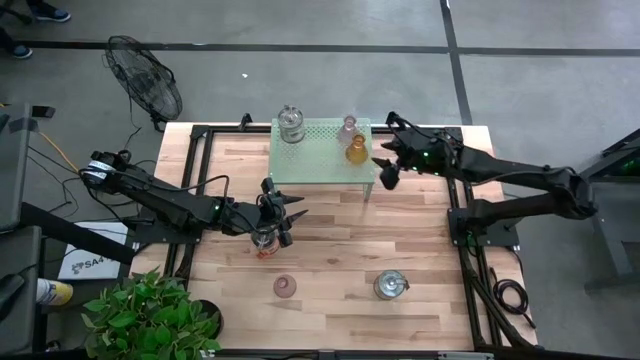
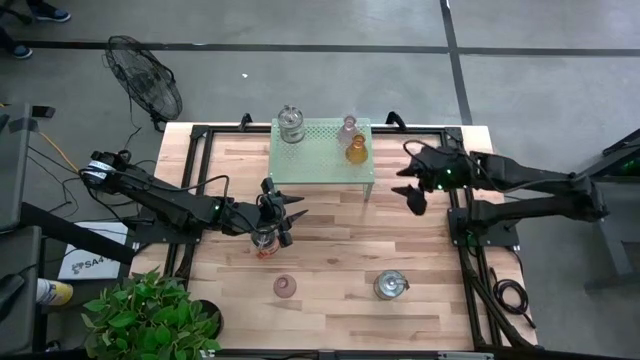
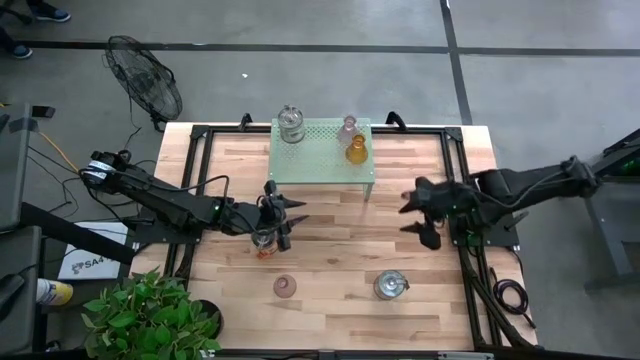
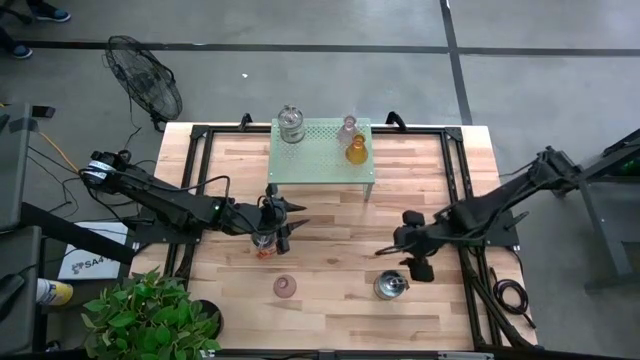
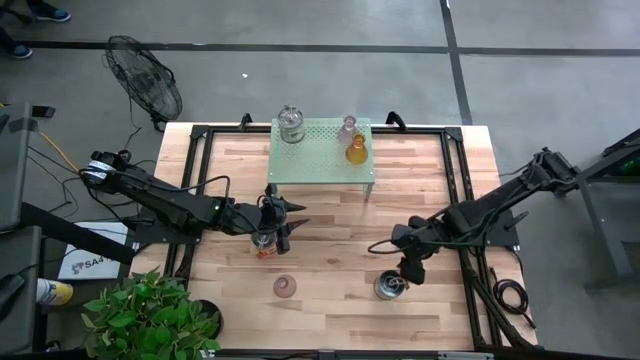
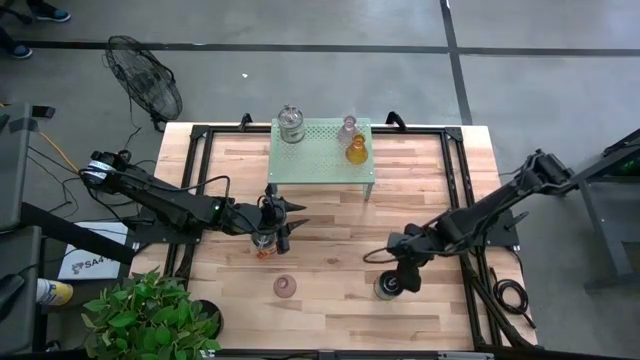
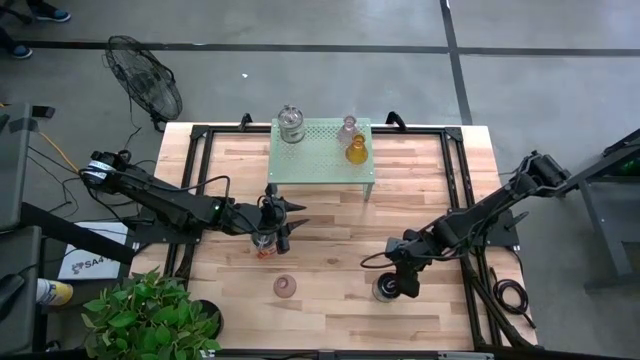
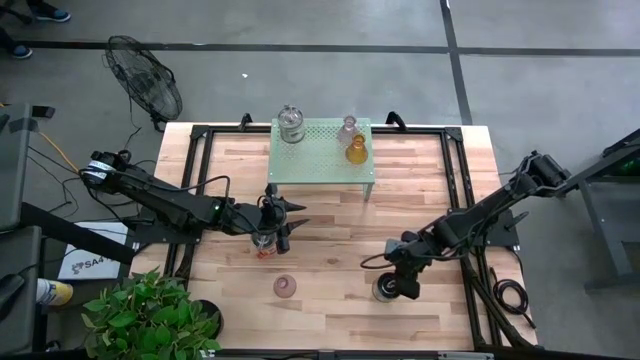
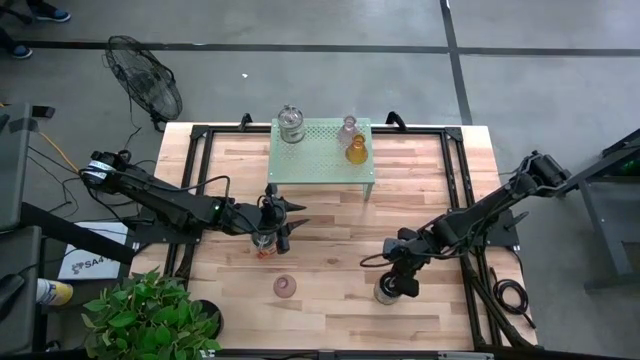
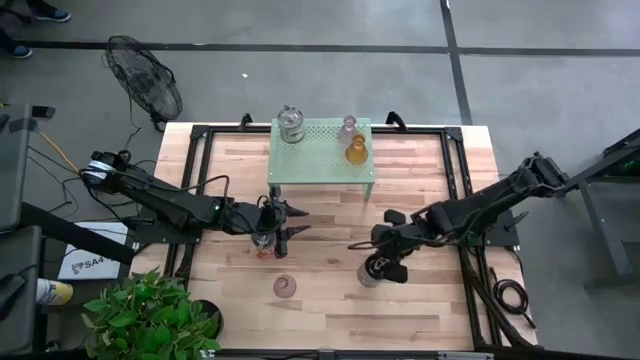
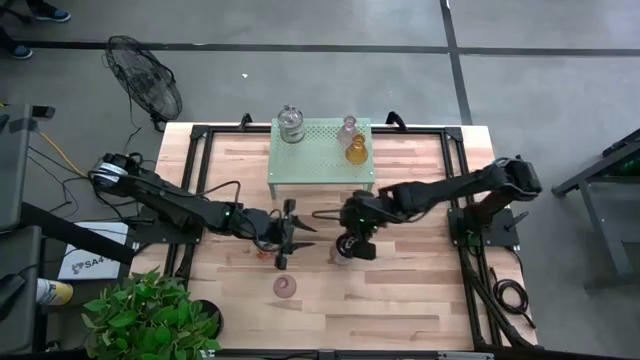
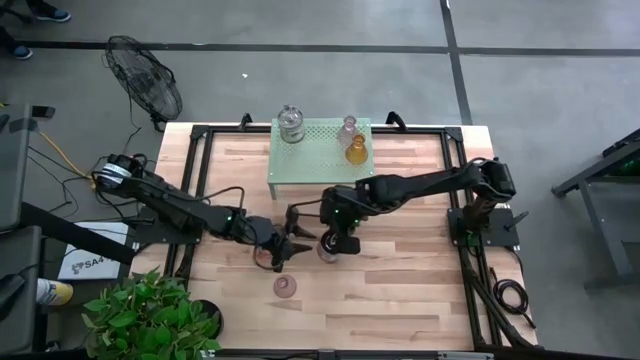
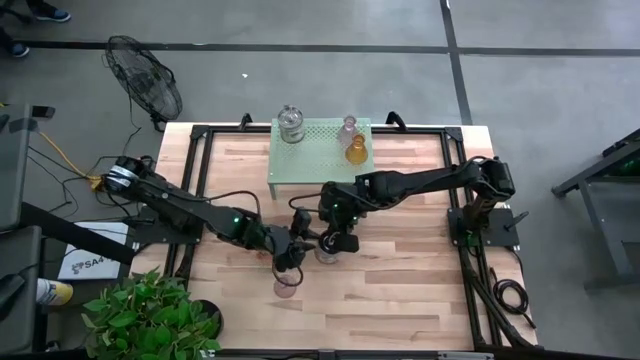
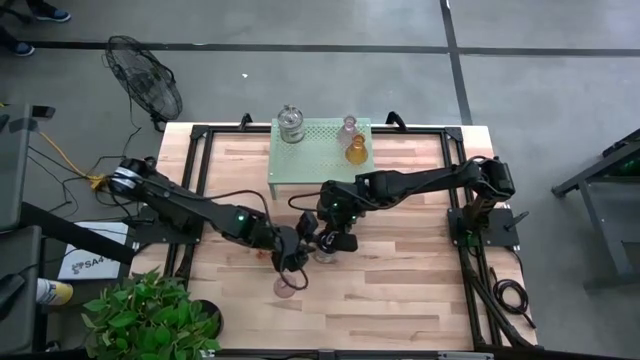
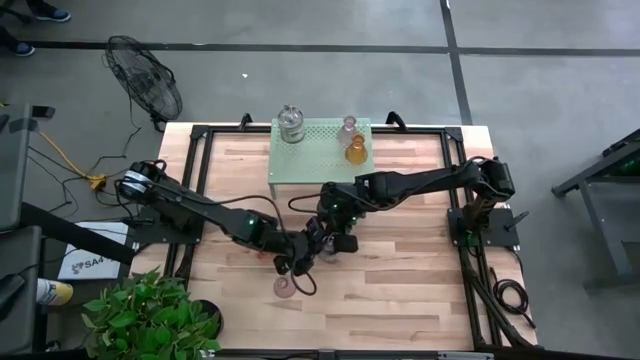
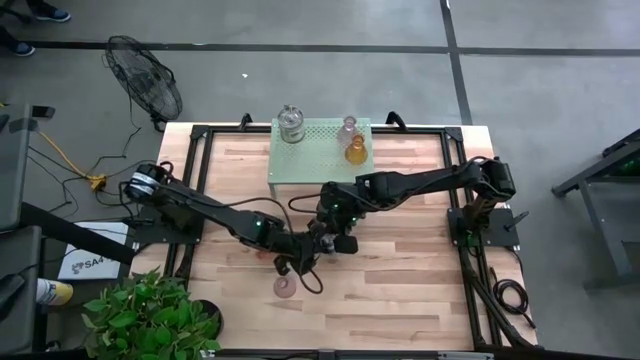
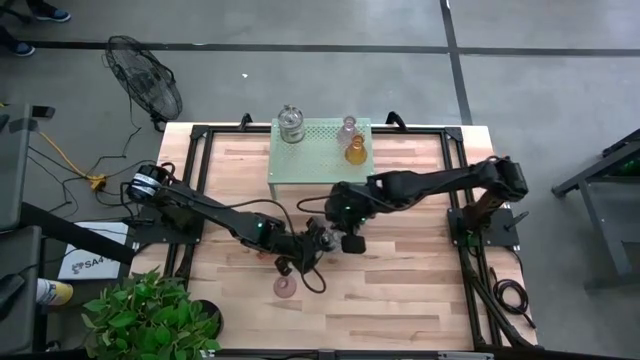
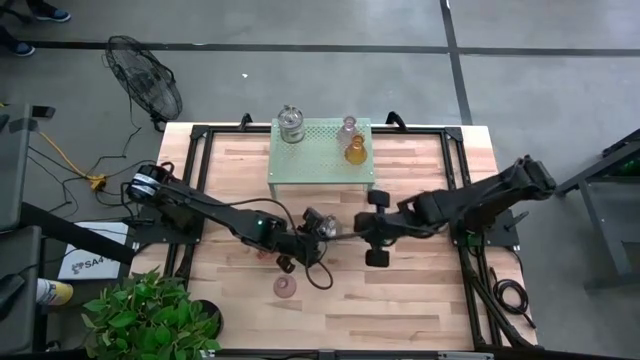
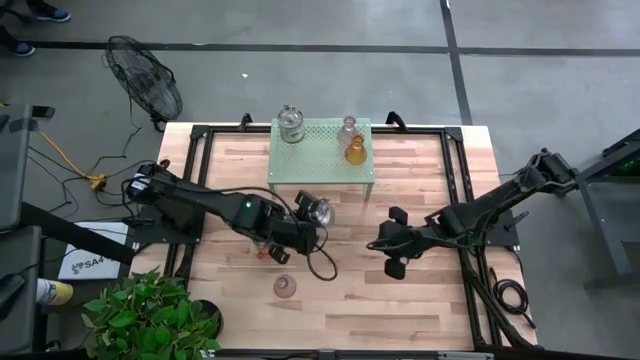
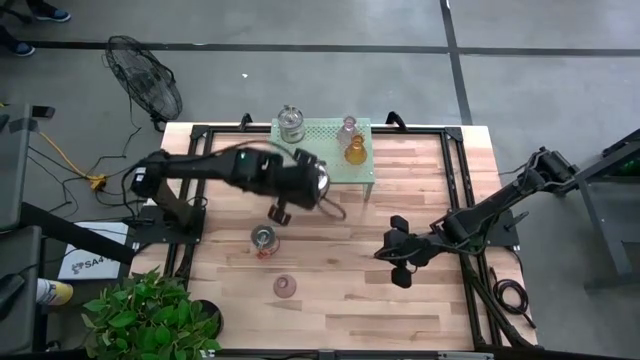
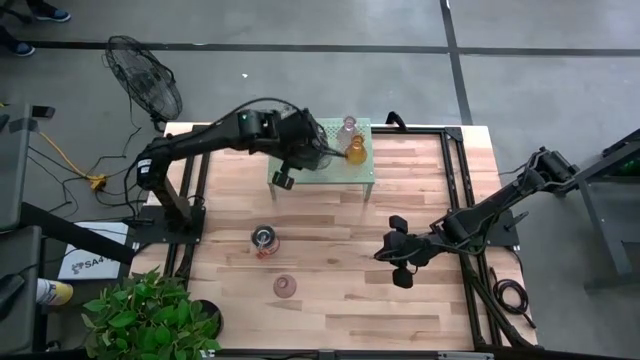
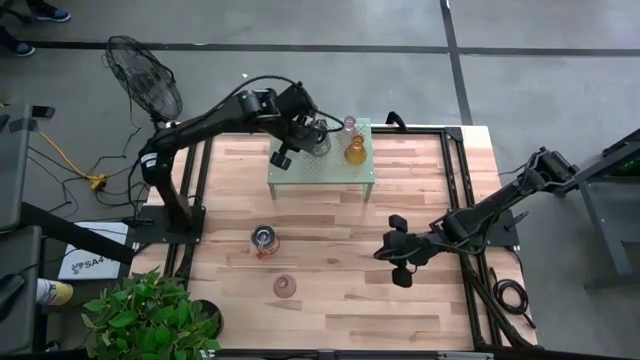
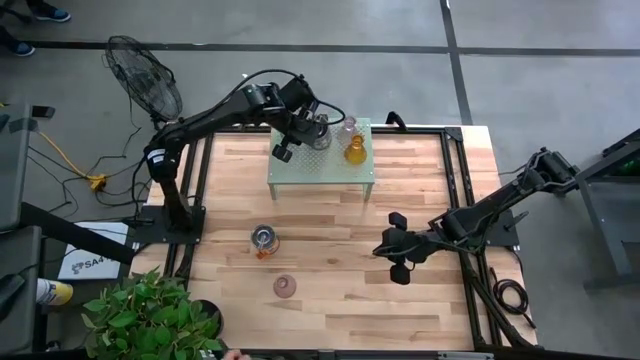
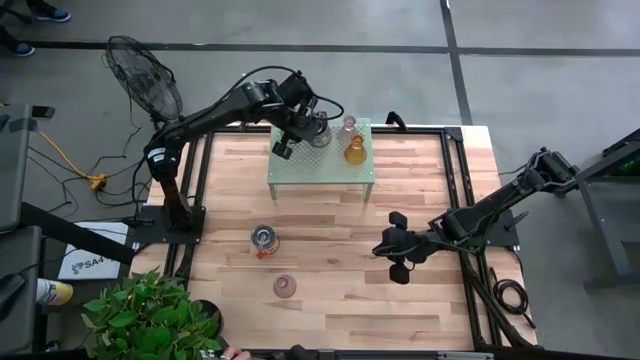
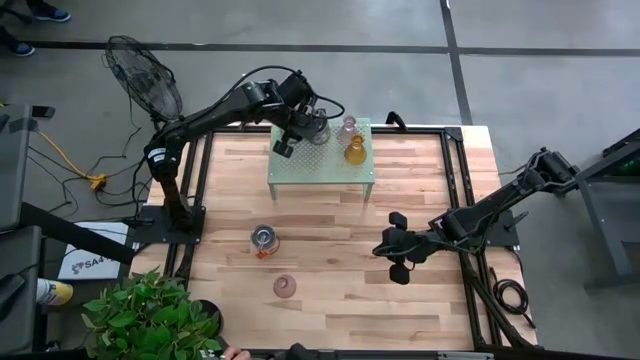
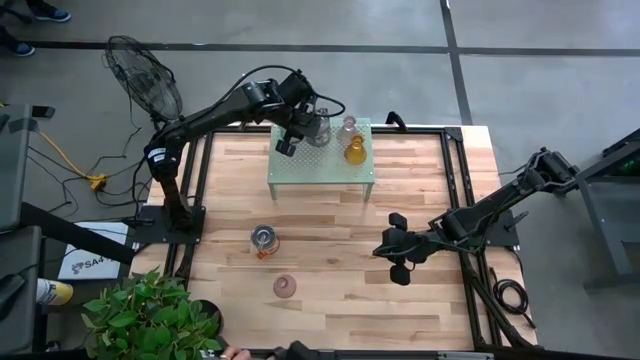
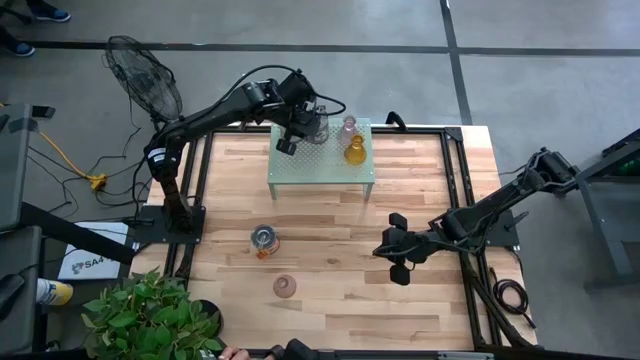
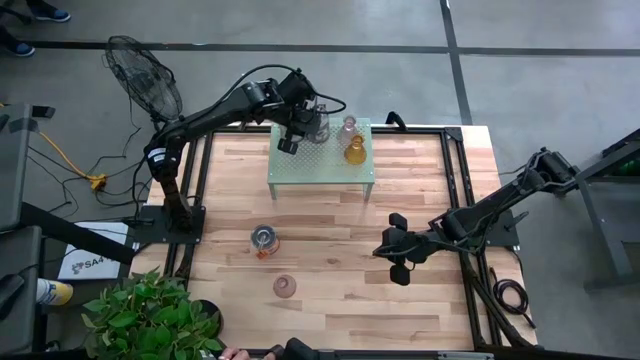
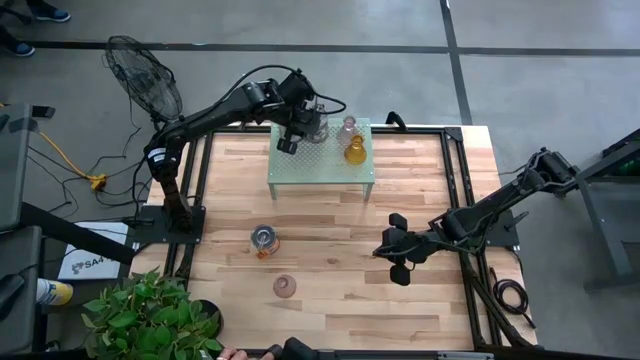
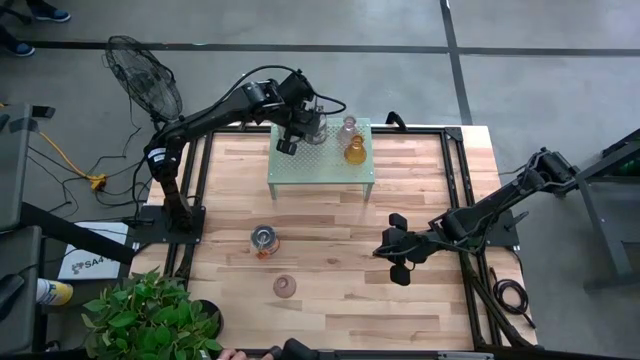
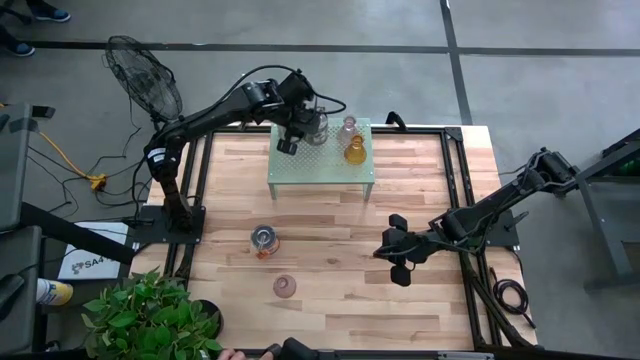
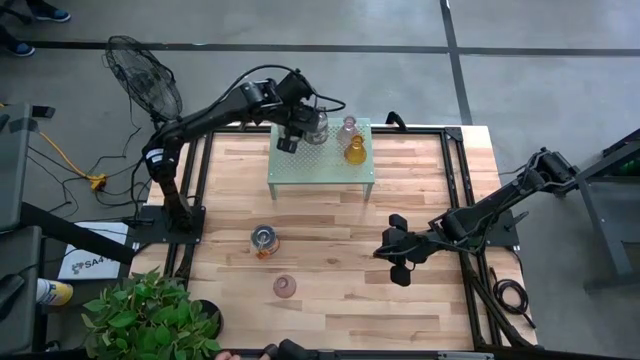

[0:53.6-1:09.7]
Task: Pick & Place candle stick holders
Put the bottom silver scented candle on the shelf

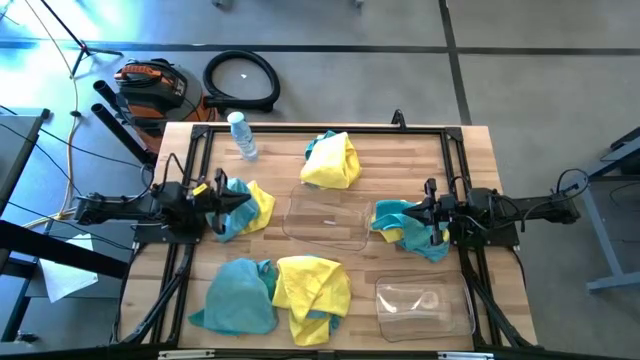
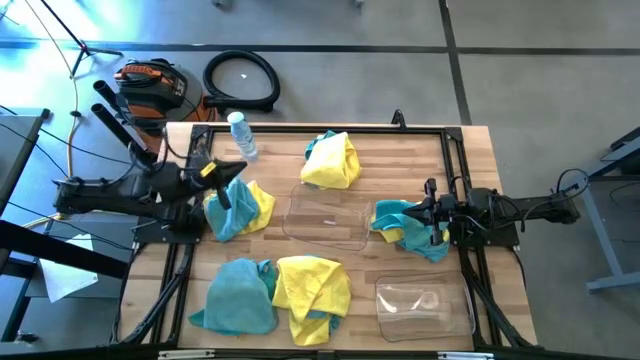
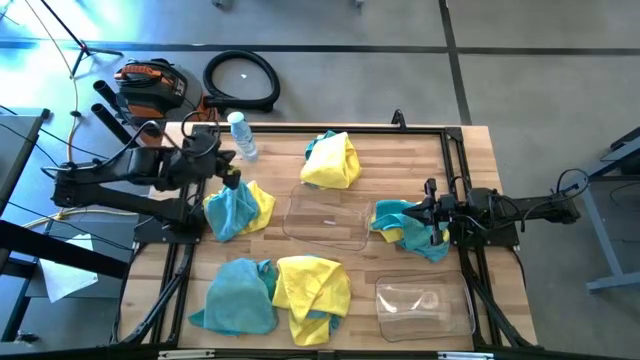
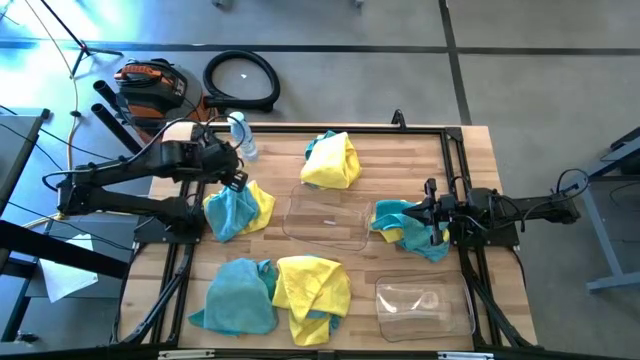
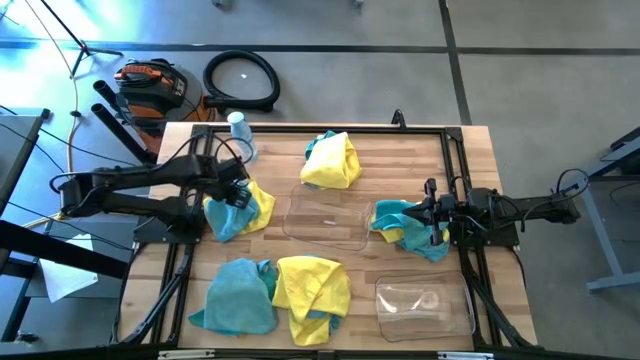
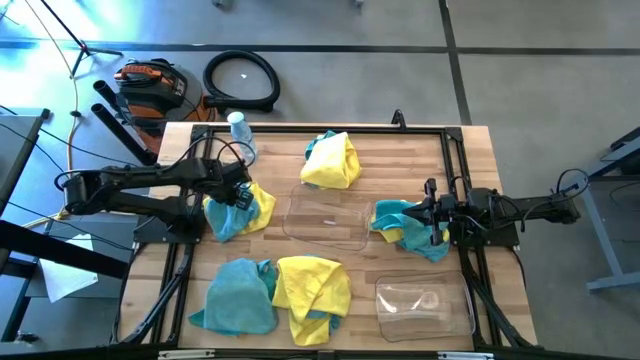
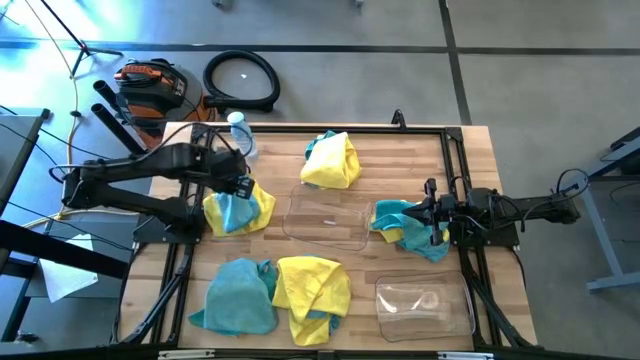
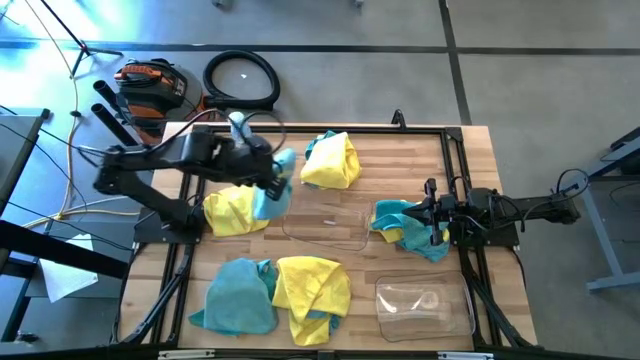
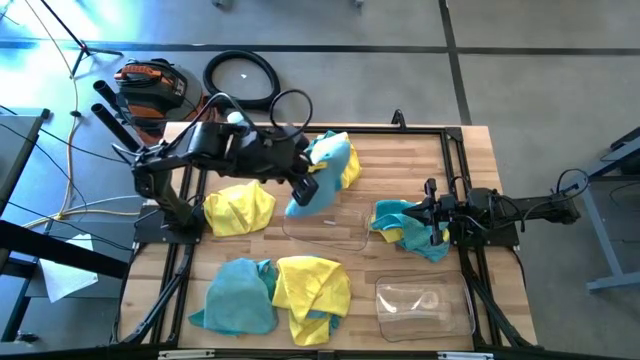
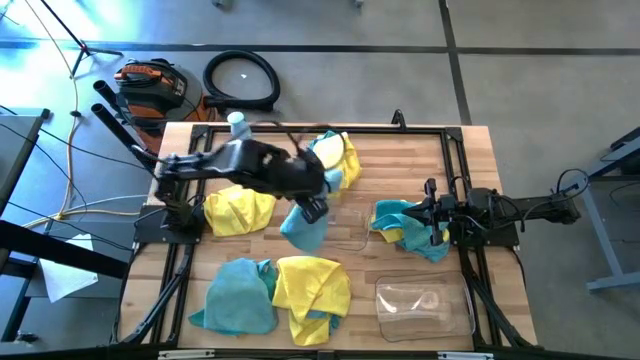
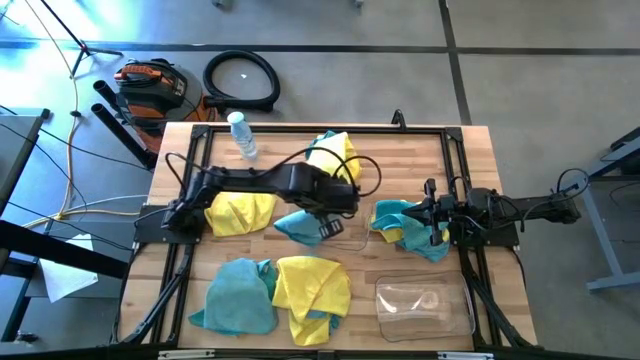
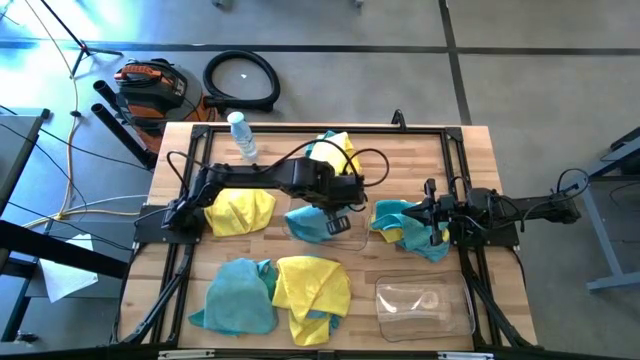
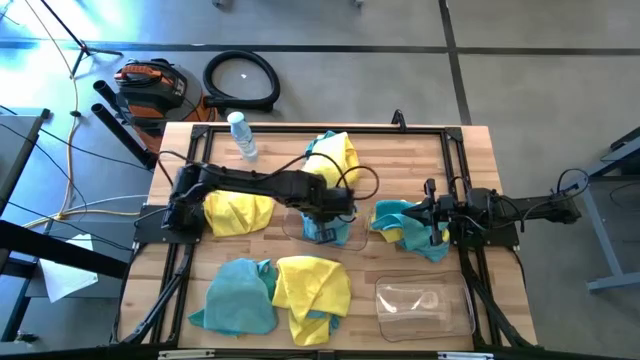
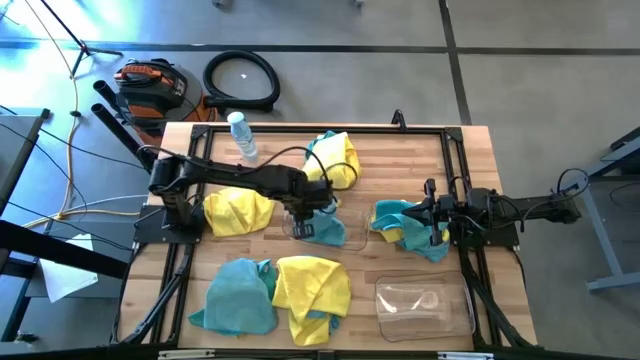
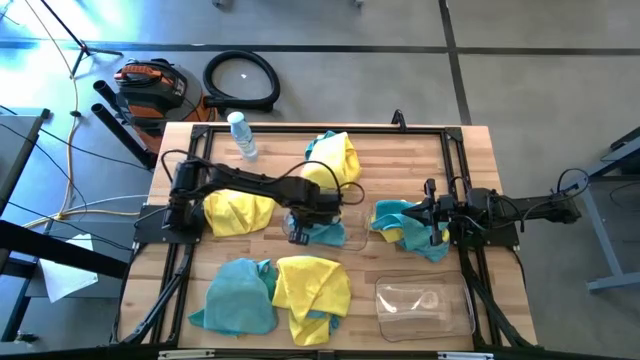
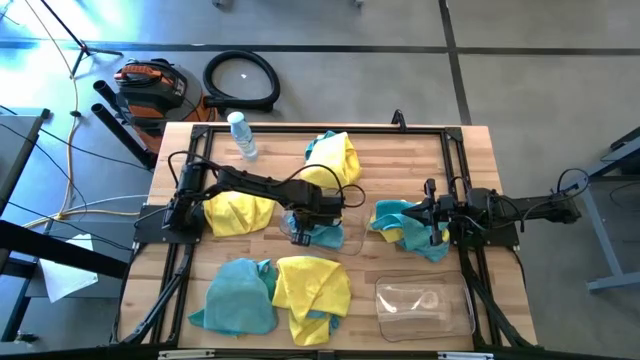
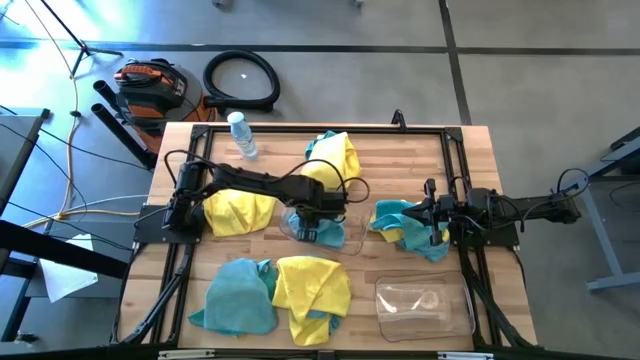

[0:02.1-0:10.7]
Task: Sort microfiber towel by color & place in baskets
Put the blue towel in the top transparent bin
